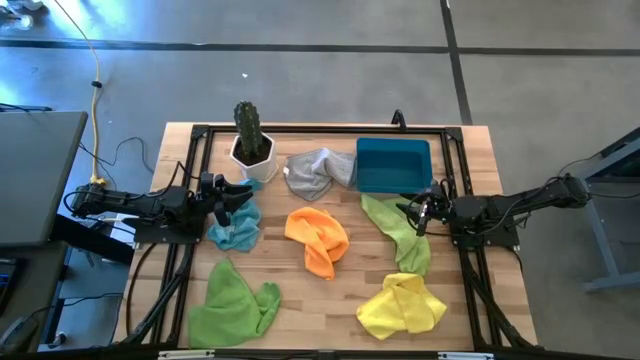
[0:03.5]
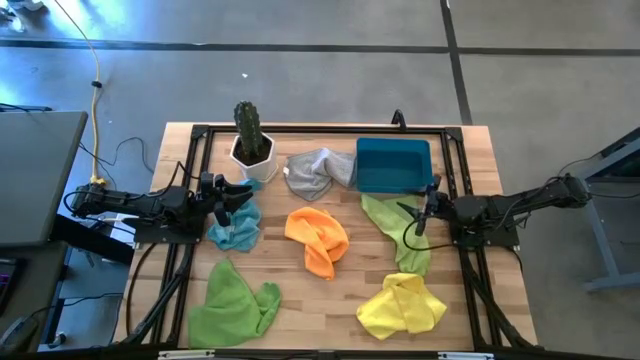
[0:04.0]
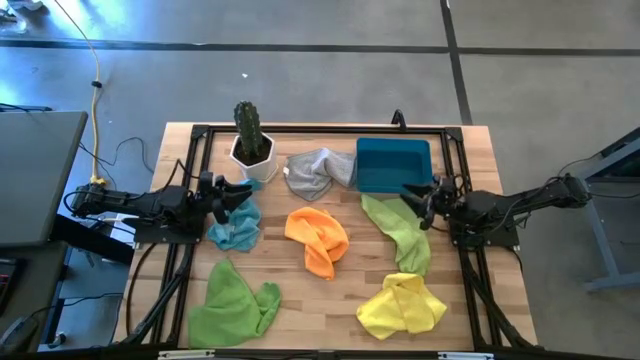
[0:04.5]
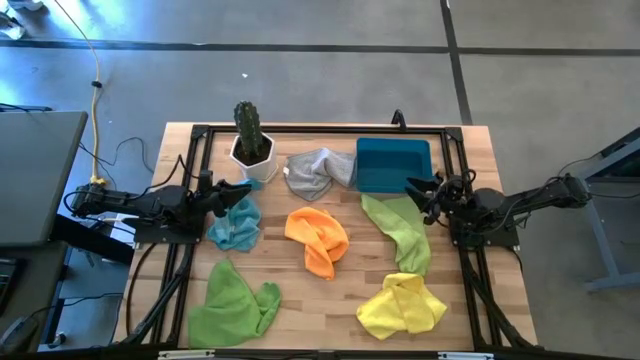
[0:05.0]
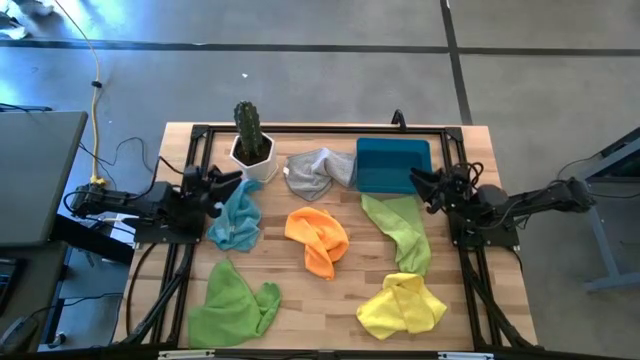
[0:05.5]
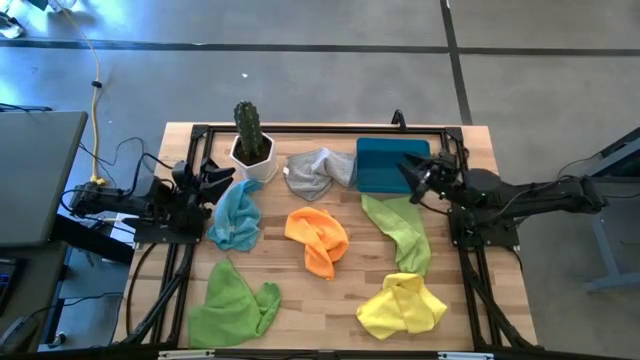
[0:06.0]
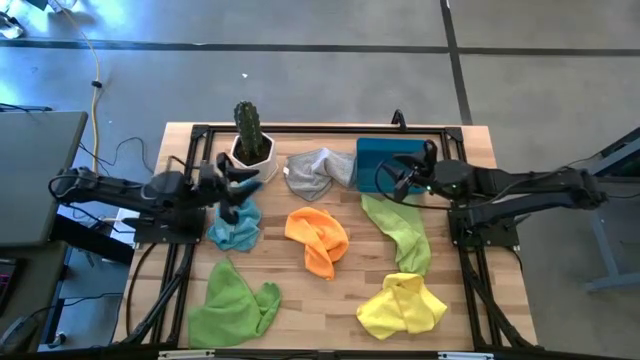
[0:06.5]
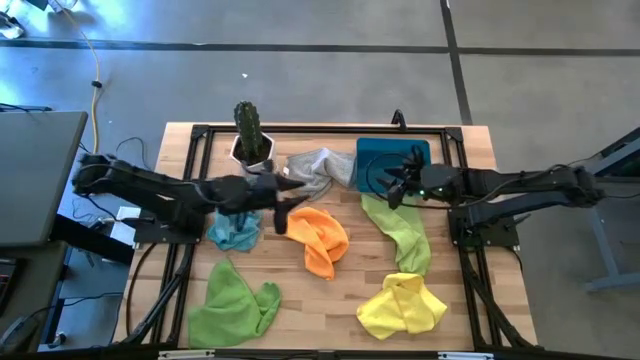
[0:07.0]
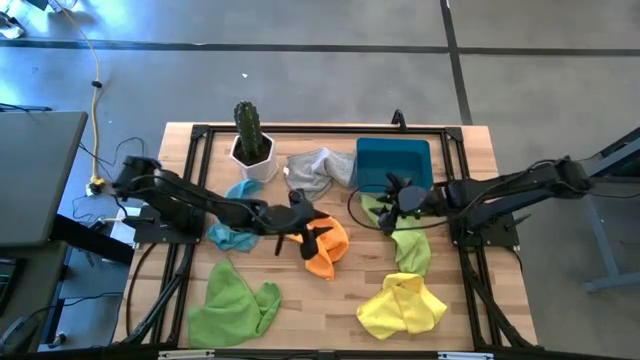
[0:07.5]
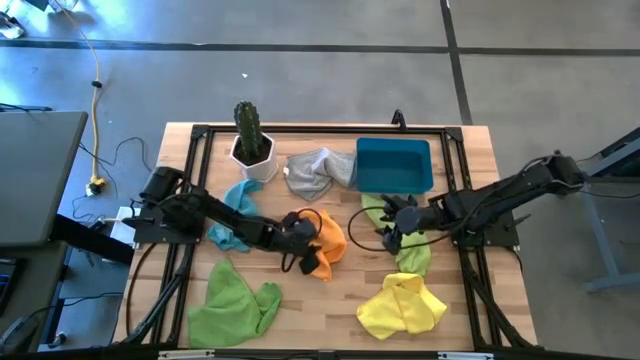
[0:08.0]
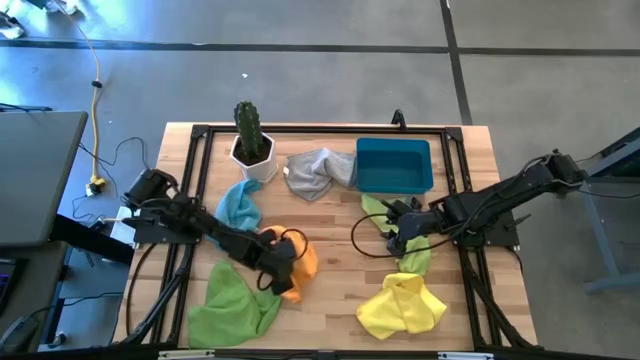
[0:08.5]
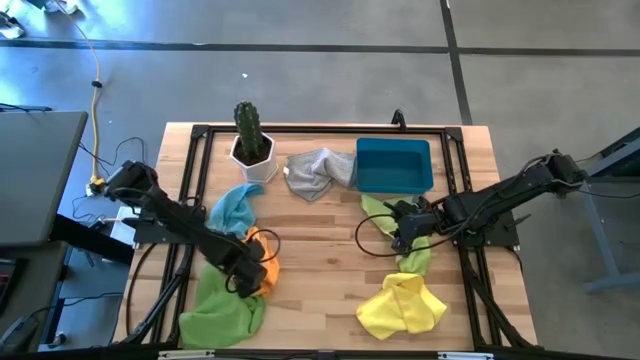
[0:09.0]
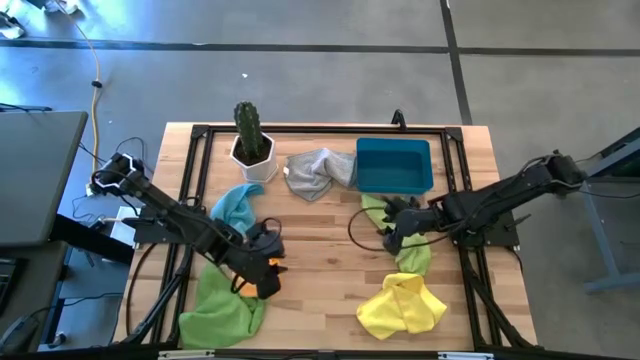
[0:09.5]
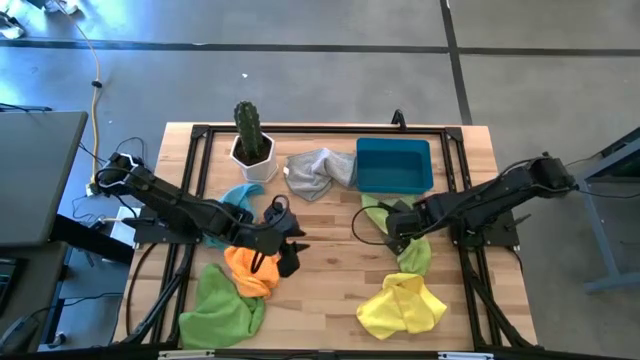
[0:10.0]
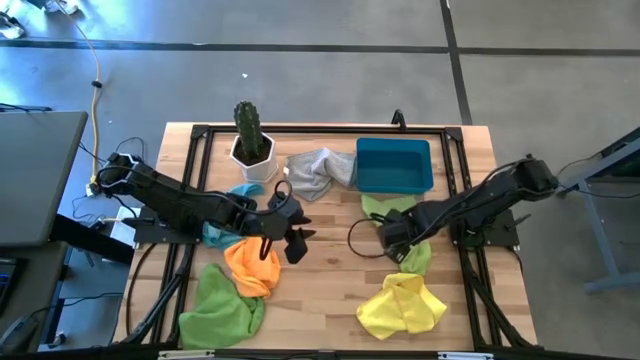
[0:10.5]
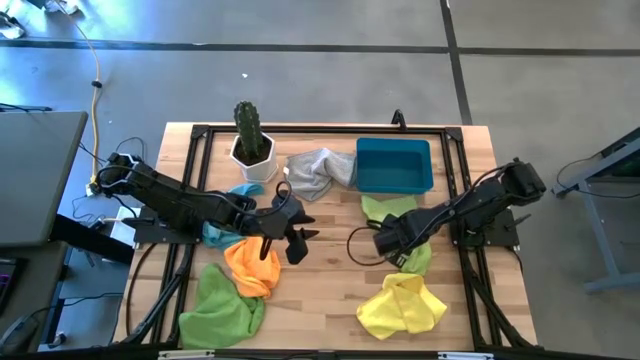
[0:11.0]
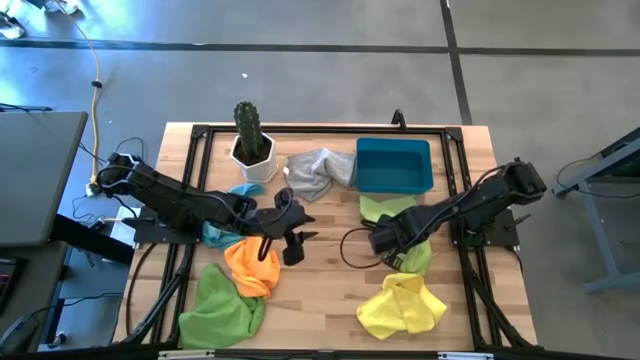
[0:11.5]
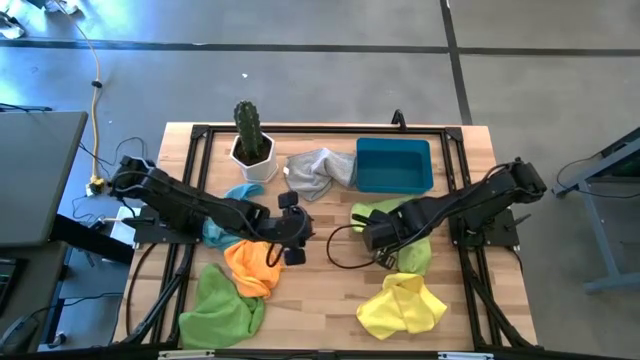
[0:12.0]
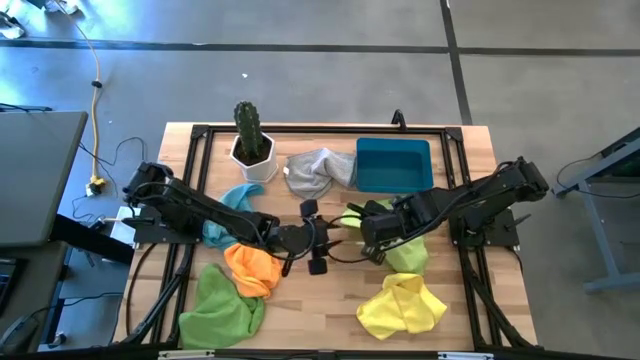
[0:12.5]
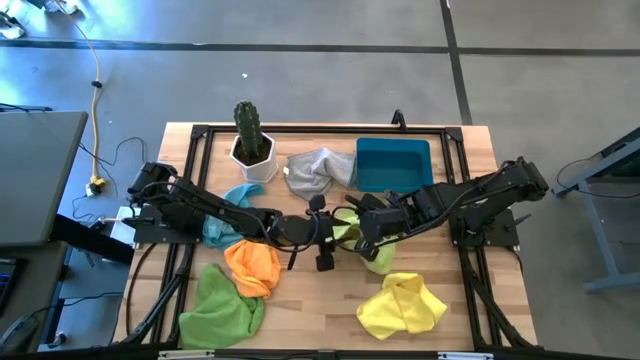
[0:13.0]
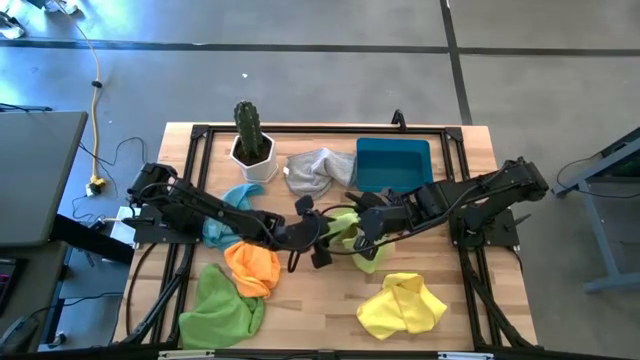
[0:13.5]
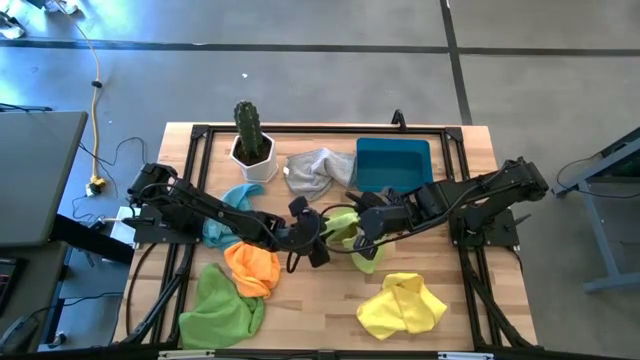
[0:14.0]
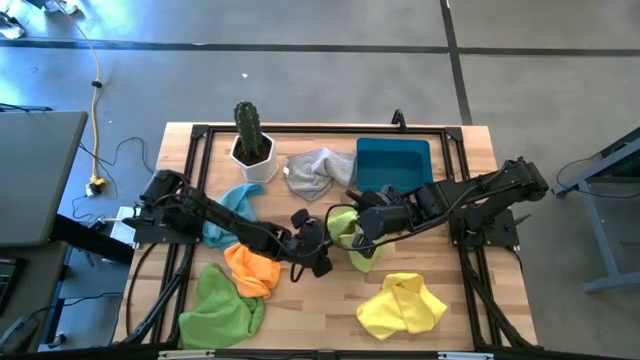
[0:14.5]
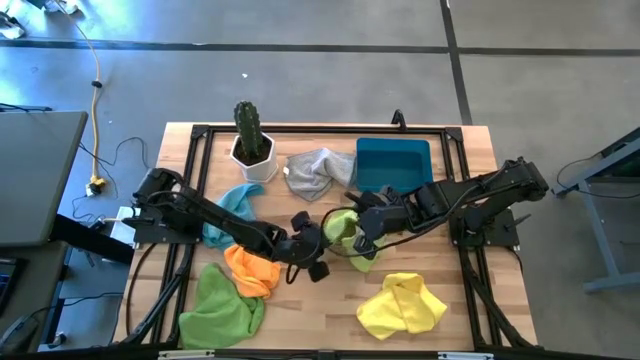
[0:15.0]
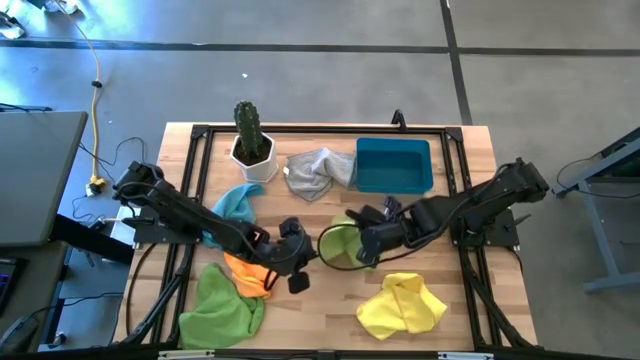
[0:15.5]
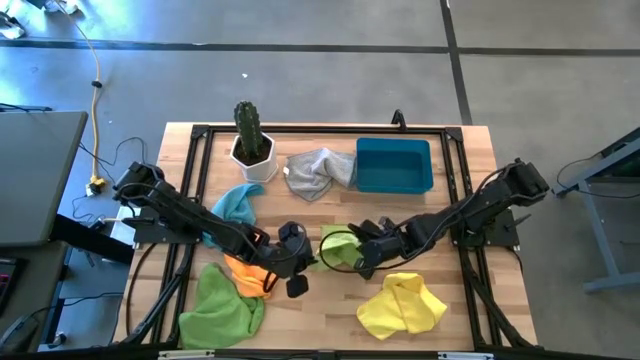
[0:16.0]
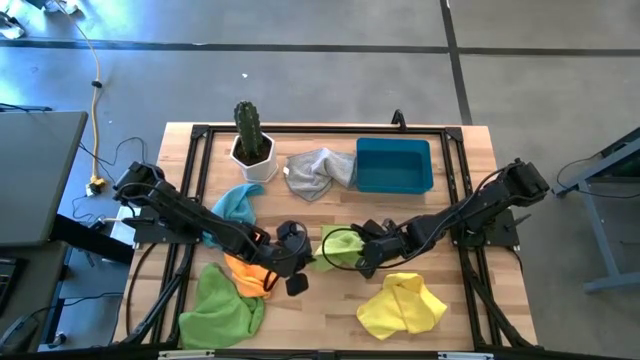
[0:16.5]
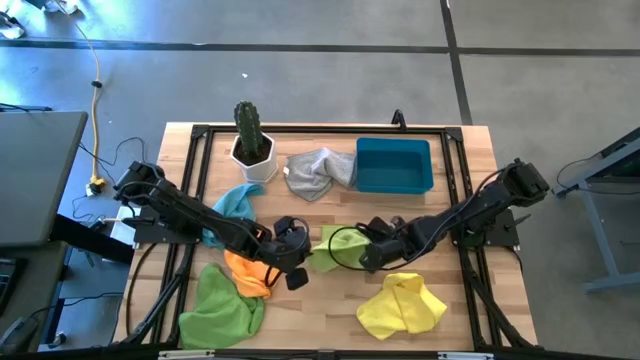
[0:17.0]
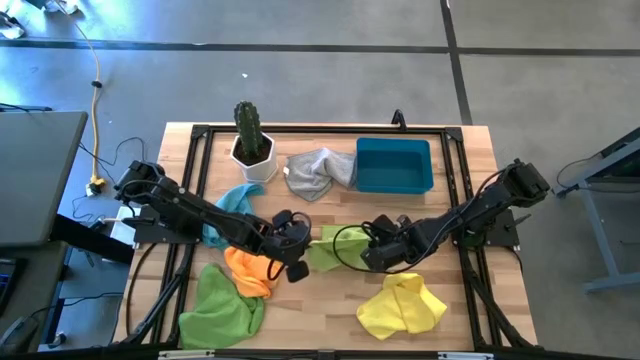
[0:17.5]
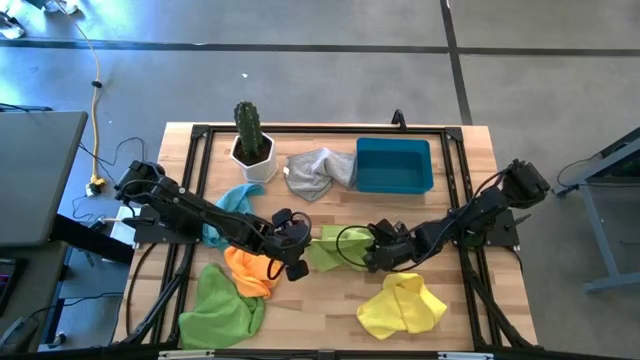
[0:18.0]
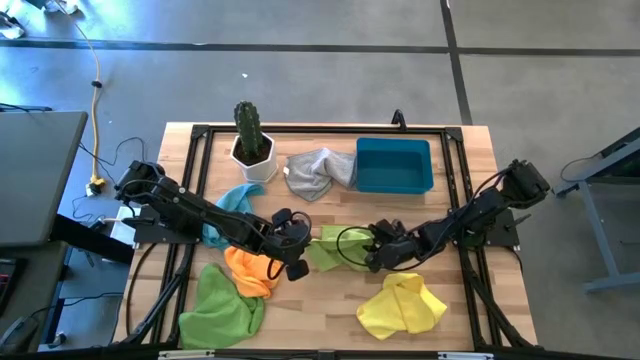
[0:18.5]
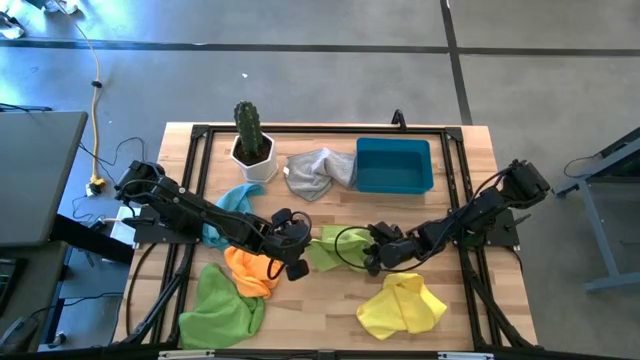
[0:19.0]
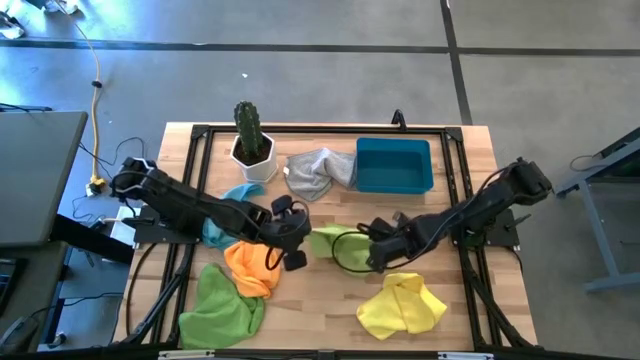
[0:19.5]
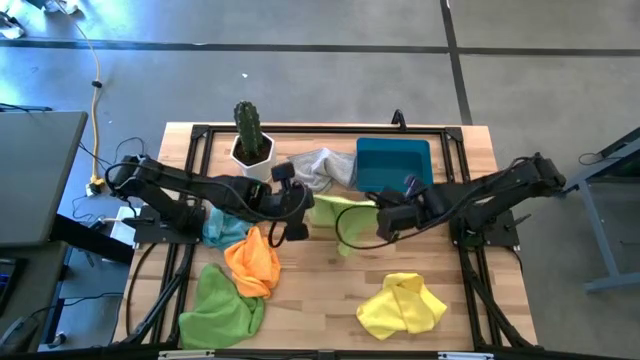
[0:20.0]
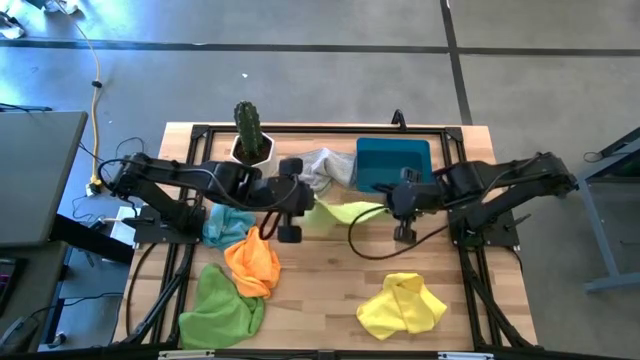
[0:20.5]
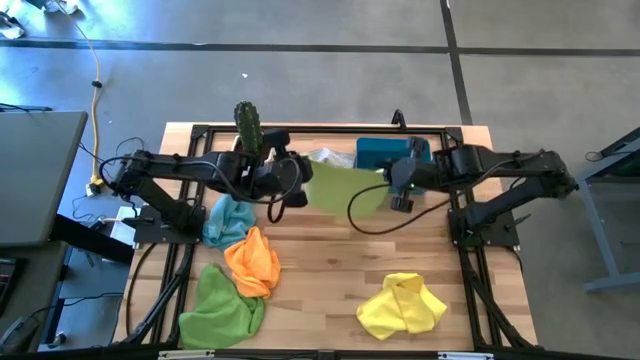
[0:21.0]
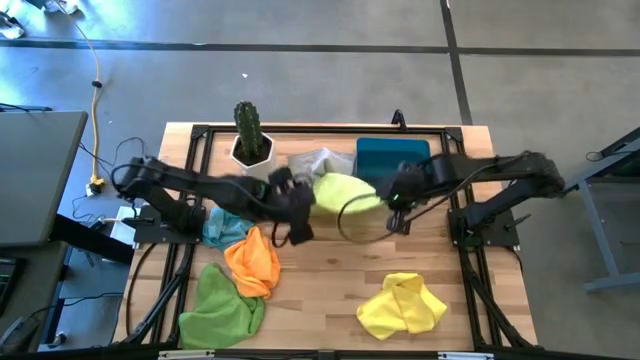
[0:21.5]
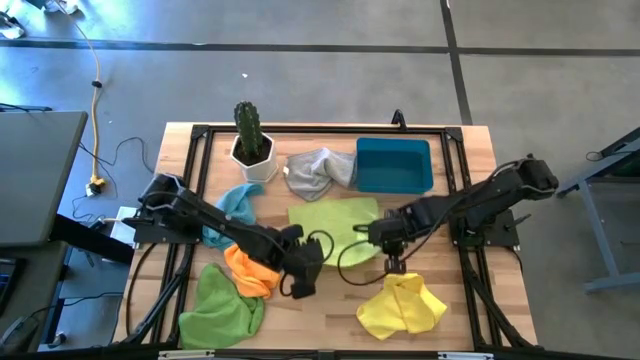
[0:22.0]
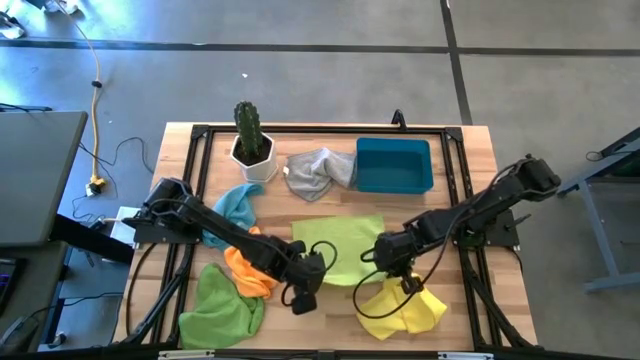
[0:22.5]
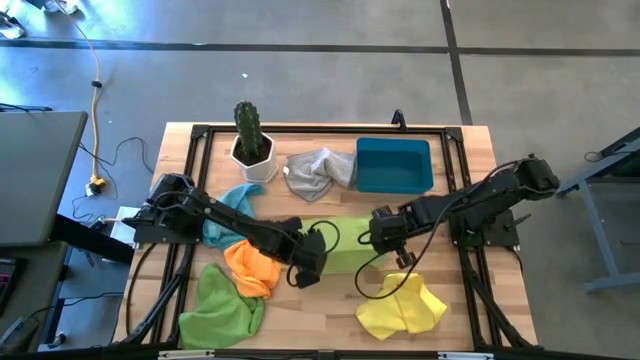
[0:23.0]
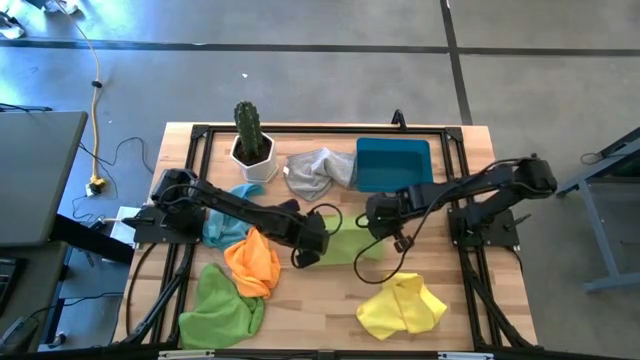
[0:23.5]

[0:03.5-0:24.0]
Task: Fold microfiber towels
Fold the light green microfiber cloth
